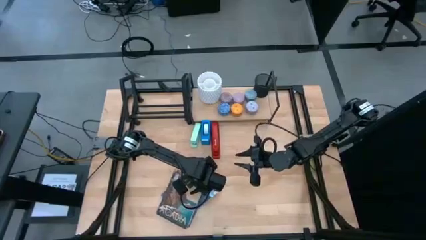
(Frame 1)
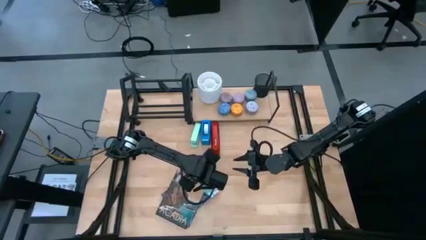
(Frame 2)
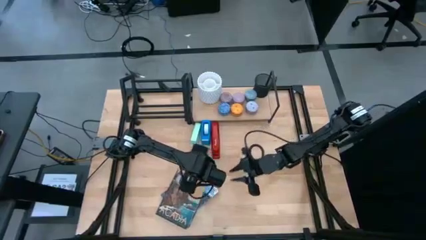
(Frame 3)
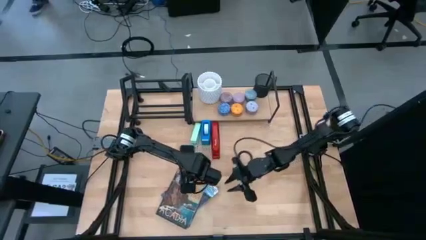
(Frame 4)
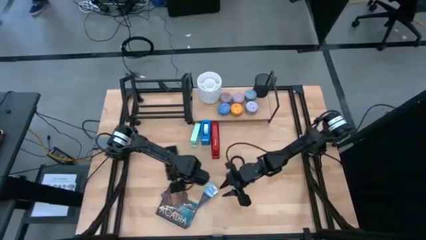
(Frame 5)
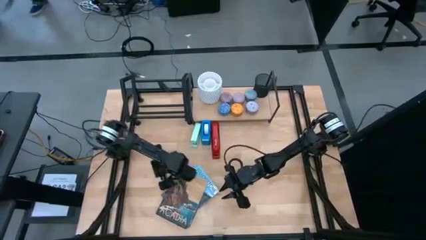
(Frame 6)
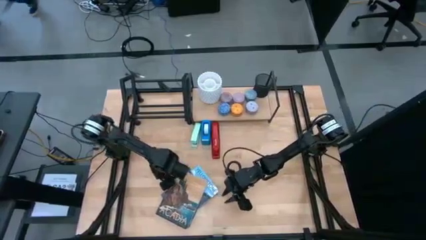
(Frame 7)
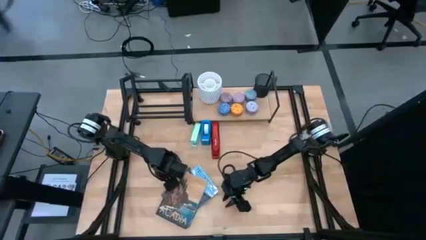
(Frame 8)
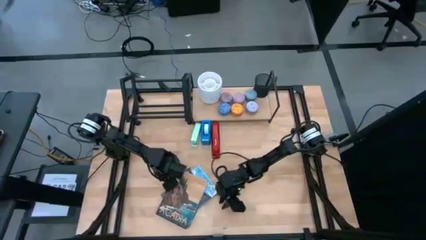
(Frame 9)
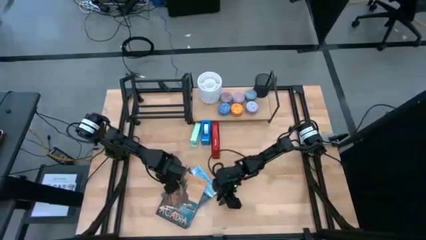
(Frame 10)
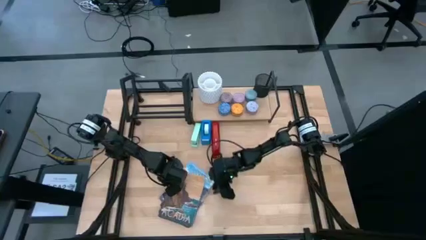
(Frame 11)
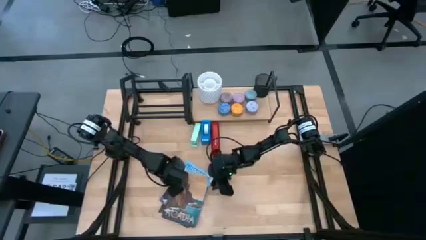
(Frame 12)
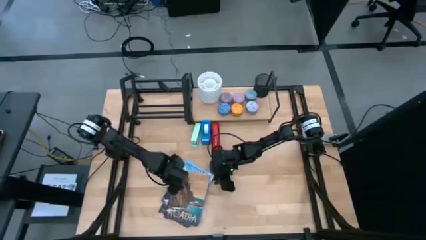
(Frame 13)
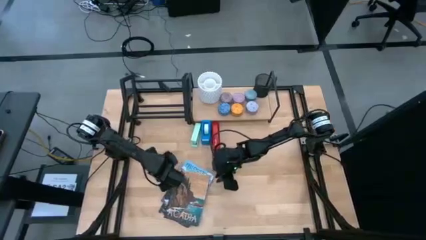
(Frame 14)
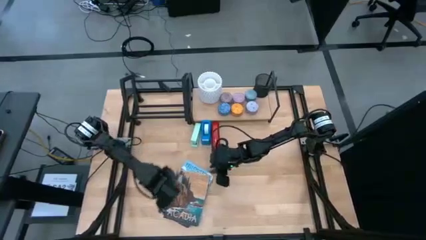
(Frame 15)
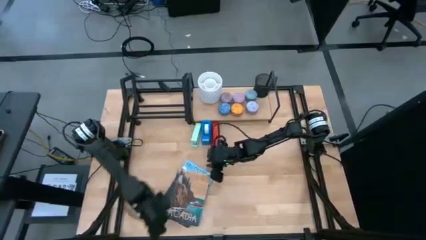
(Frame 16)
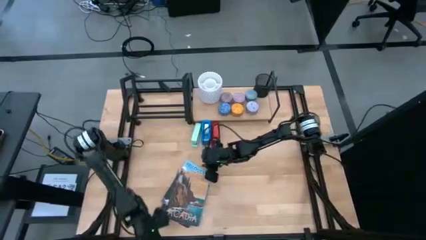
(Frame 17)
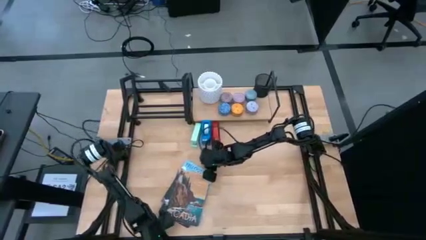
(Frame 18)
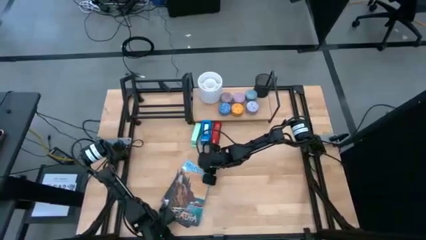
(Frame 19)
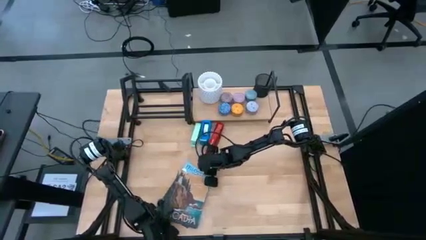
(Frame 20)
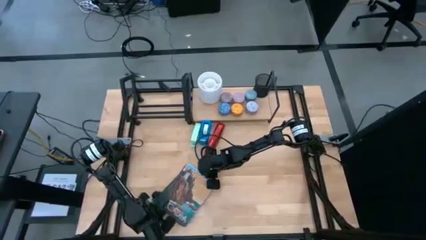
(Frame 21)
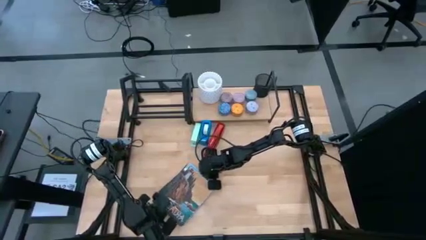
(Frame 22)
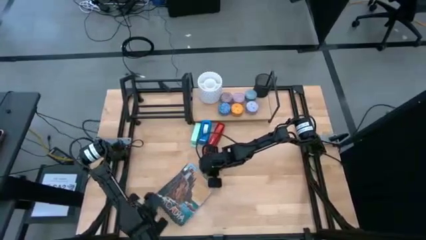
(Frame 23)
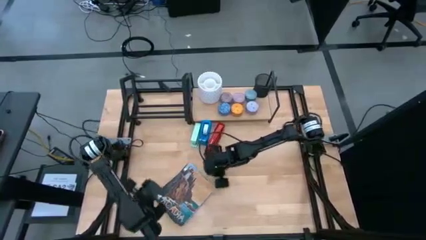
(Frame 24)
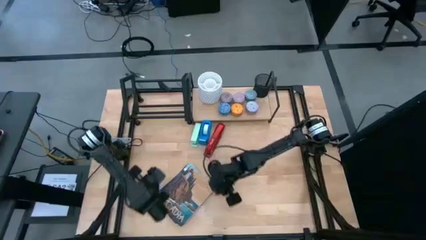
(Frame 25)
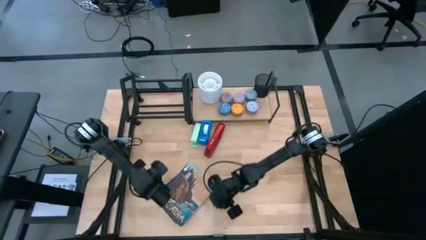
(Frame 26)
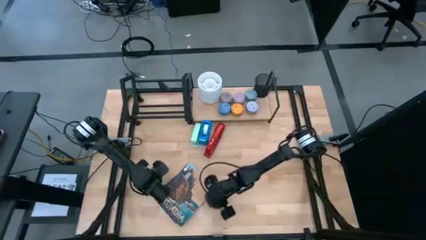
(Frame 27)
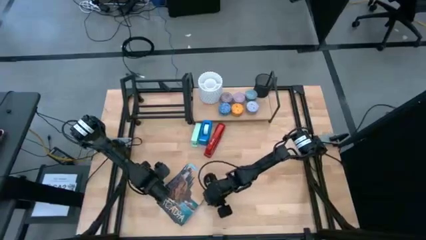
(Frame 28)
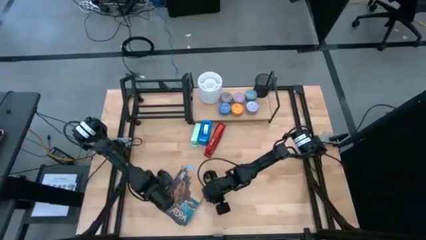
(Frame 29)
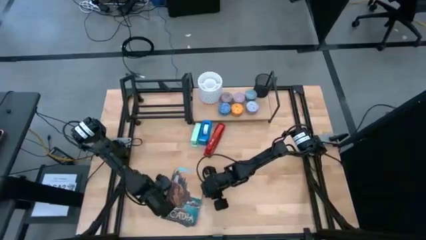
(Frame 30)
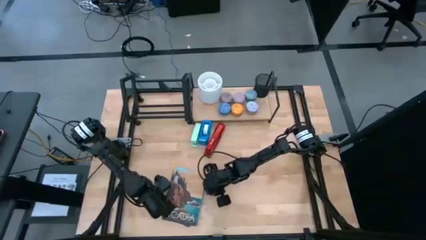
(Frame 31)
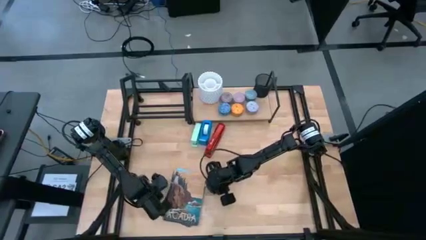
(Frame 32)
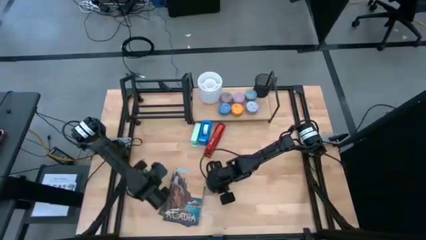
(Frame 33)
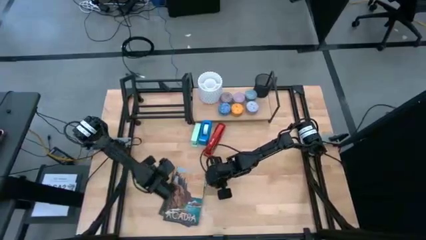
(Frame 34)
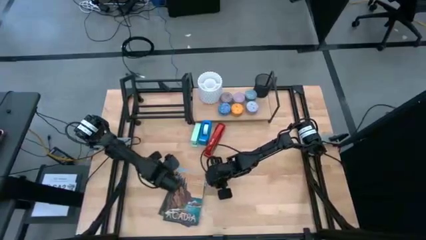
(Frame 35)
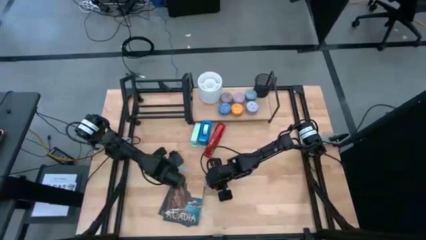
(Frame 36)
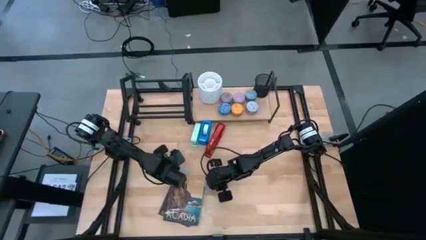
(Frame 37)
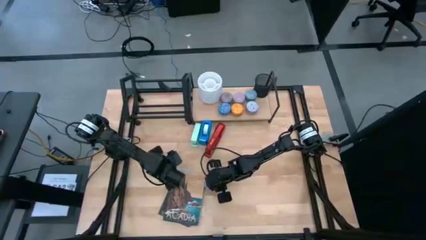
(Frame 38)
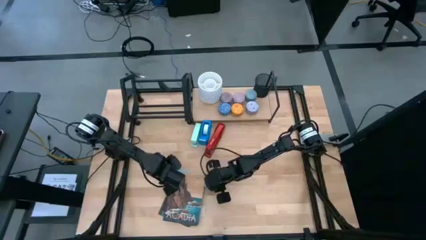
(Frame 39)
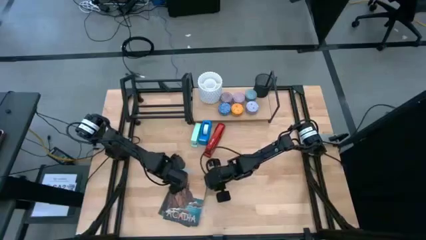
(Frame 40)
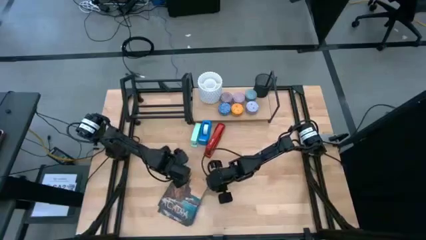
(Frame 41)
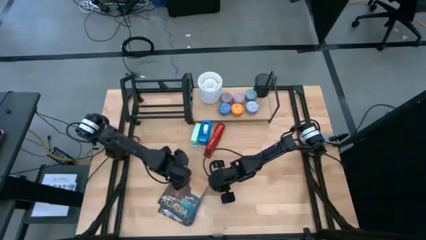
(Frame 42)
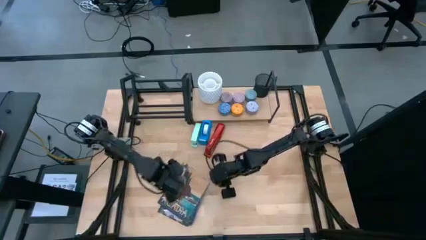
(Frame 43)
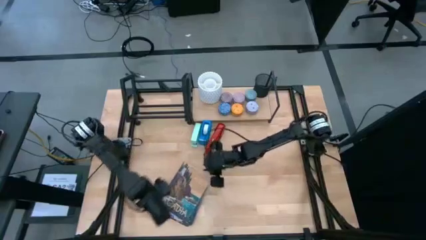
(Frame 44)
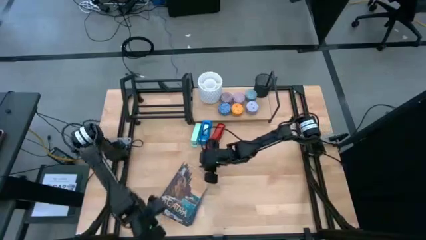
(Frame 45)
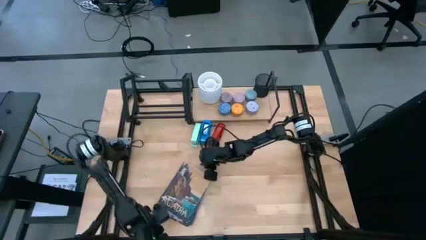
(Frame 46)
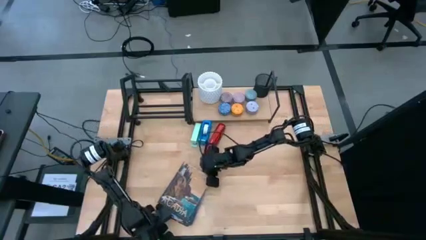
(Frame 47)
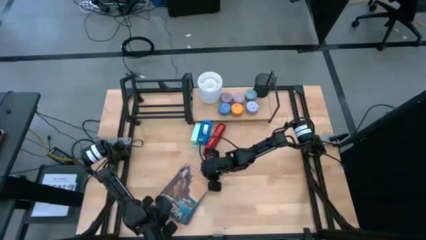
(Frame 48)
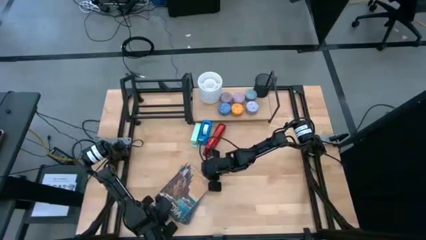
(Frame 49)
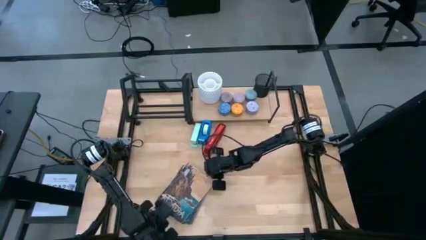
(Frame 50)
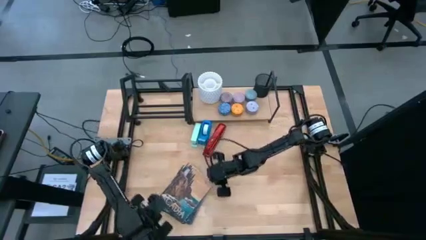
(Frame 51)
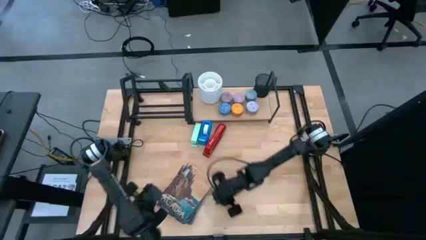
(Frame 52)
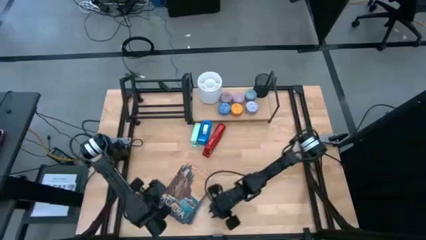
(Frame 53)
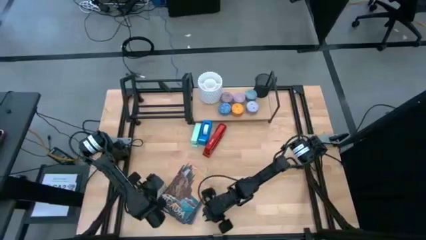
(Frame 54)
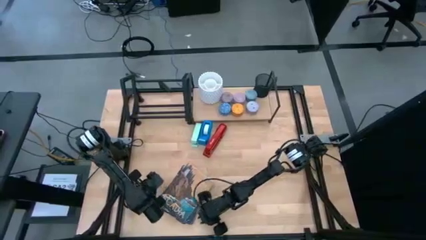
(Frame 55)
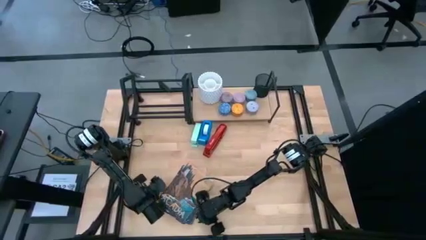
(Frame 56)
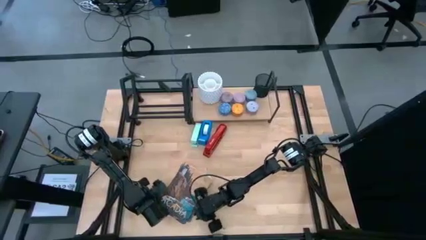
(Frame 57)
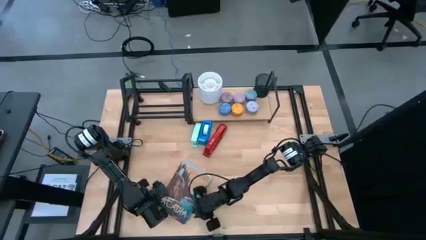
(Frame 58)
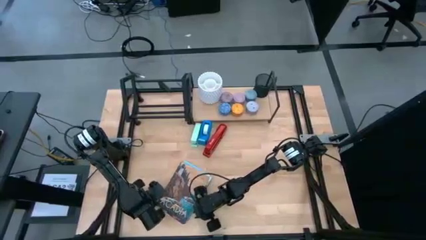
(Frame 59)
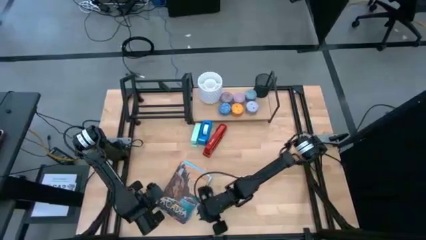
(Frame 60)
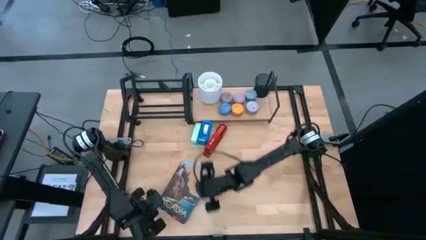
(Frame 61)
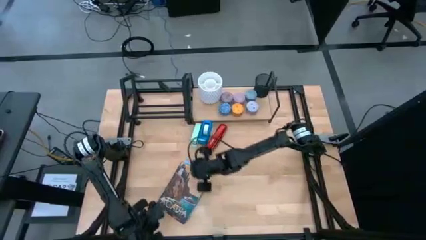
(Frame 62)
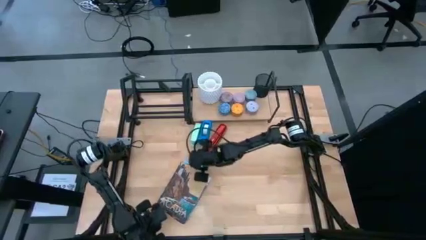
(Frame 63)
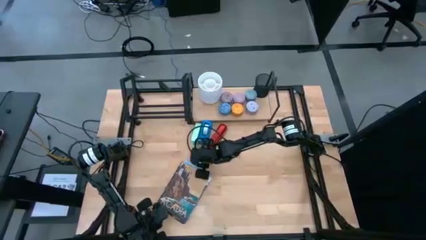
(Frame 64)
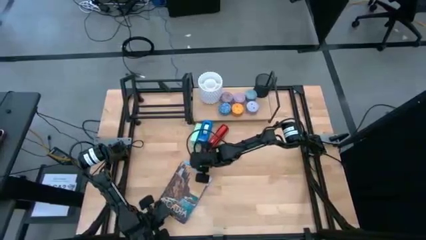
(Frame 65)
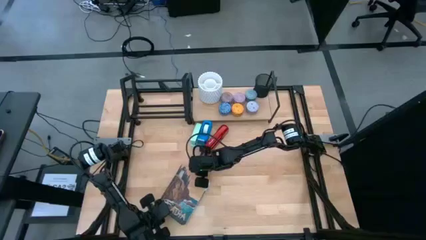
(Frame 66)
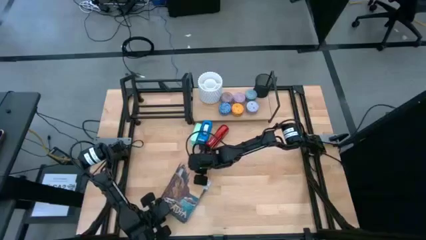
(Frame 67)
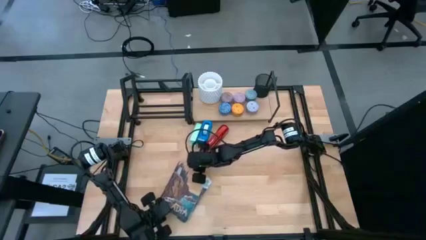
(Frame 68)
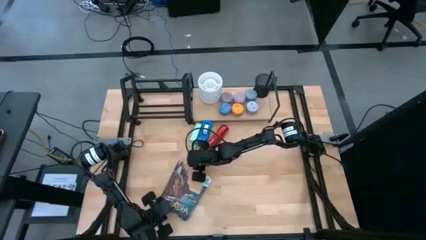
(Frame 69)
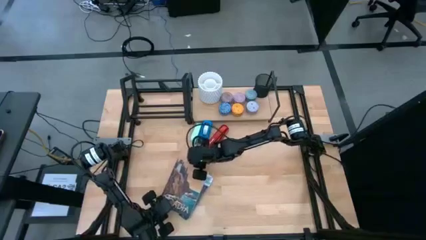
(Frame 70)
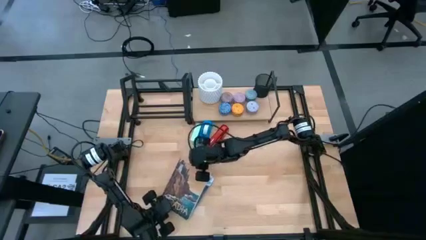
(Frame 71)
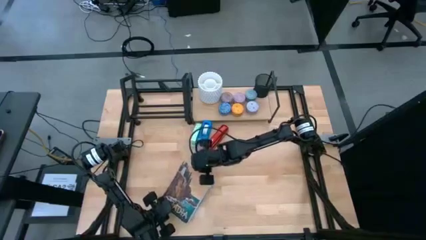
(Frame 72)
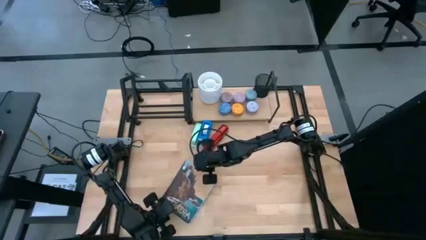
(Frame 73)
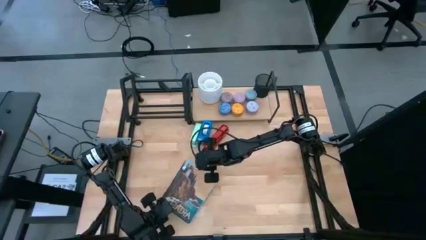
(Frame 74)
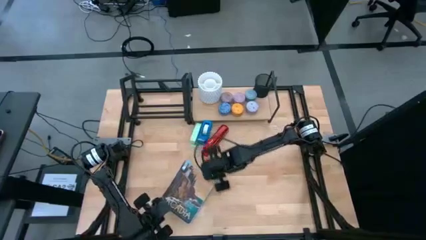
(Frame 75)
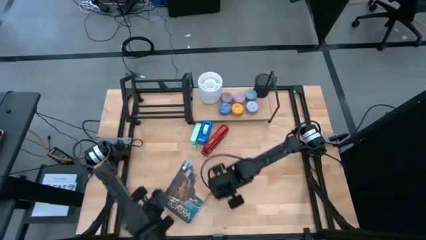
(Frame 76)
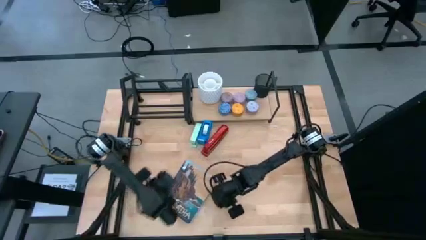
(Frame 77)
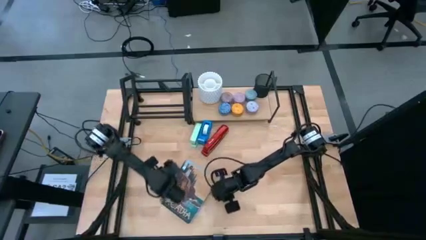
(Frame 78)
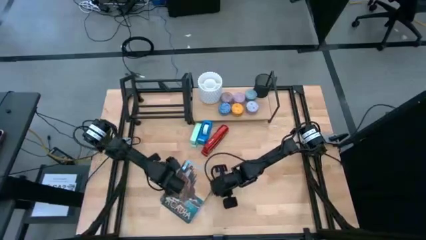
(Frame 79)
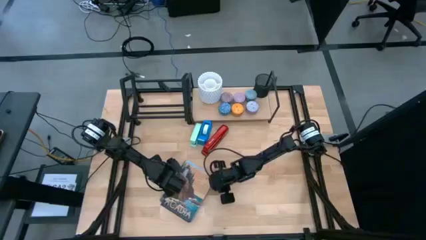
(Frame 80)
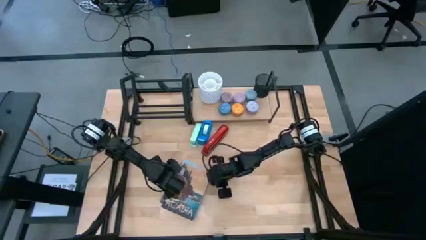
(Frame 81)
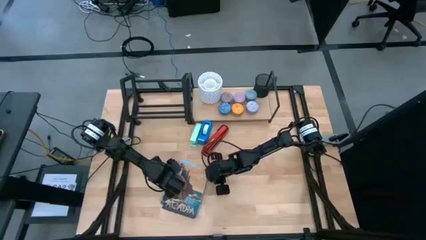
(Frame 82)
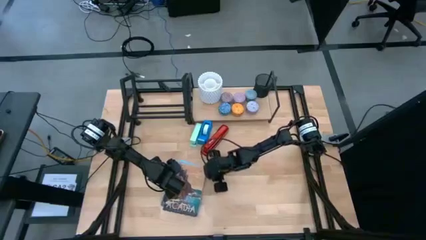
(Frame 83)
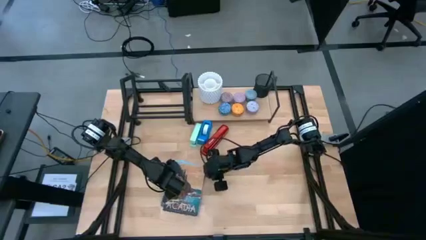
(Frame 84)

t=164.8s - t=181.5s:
Task: Stock shelves
Adjust all the stacked books
